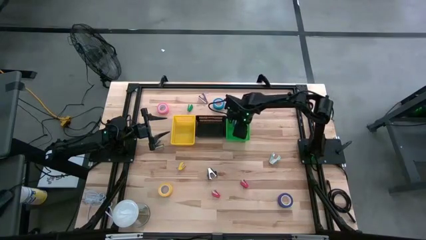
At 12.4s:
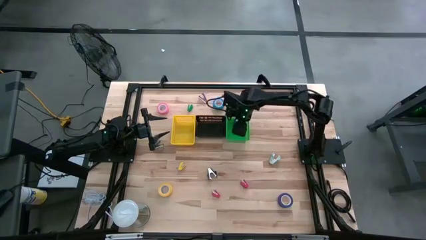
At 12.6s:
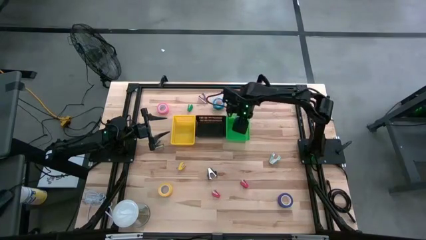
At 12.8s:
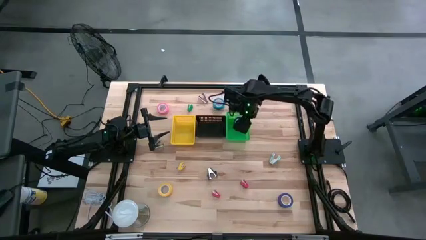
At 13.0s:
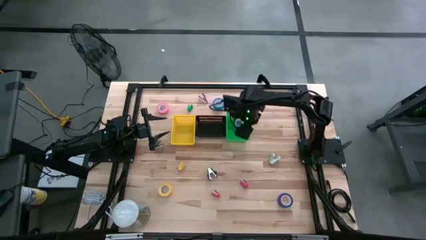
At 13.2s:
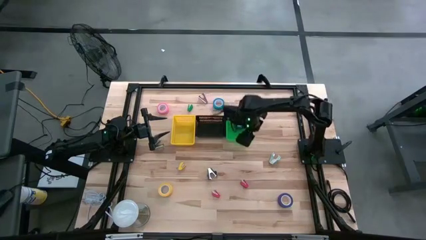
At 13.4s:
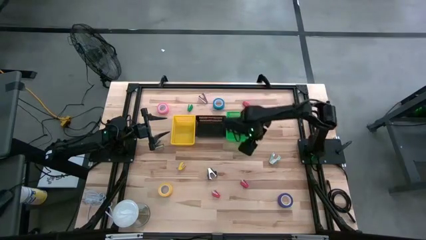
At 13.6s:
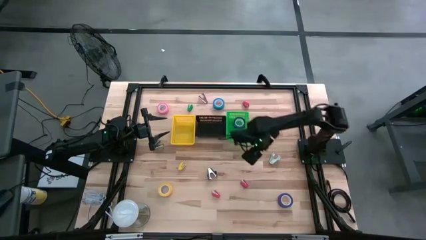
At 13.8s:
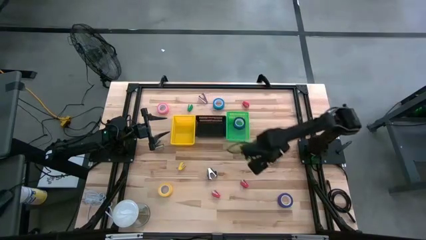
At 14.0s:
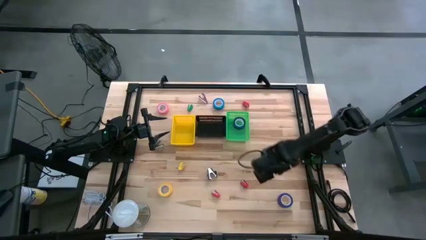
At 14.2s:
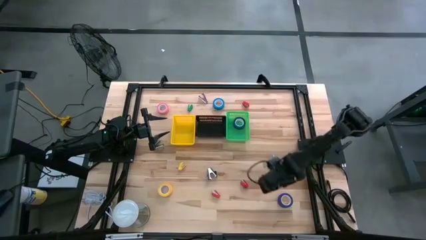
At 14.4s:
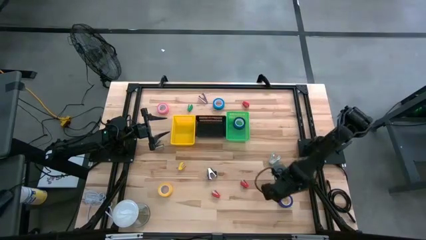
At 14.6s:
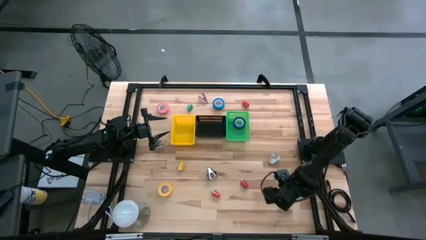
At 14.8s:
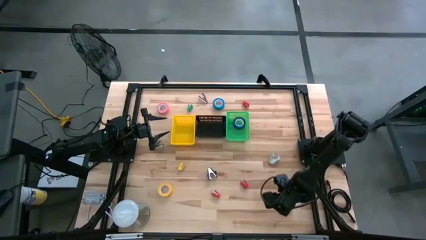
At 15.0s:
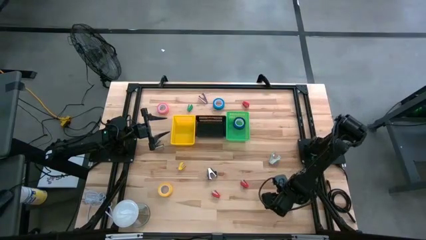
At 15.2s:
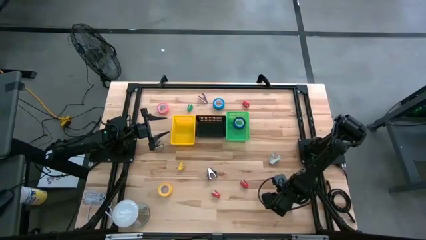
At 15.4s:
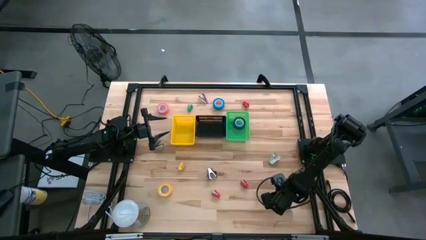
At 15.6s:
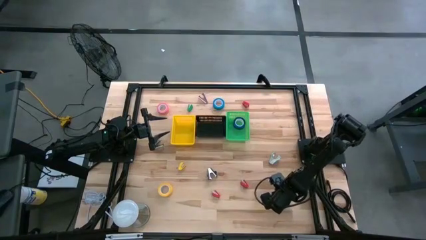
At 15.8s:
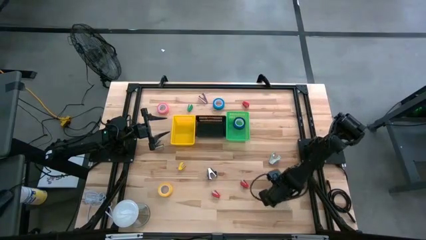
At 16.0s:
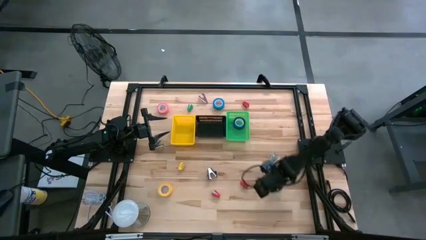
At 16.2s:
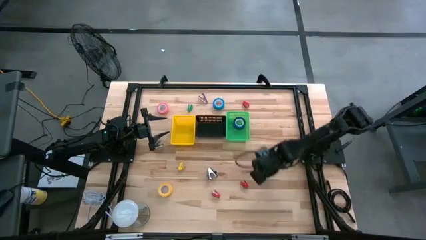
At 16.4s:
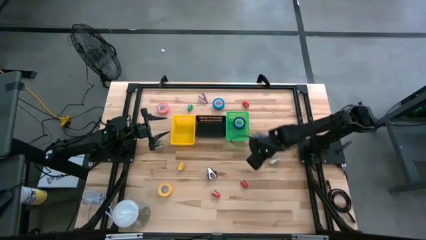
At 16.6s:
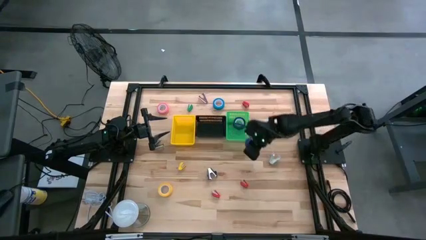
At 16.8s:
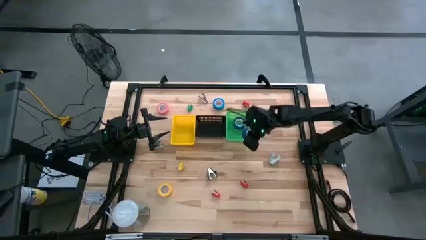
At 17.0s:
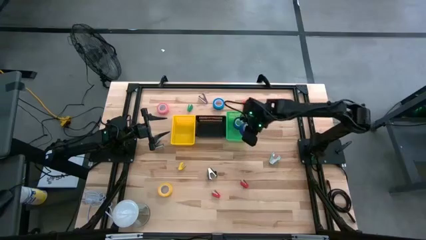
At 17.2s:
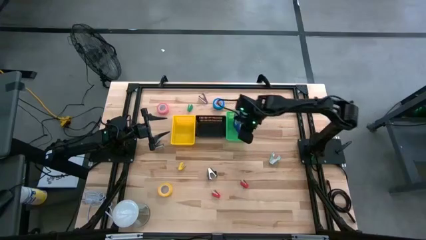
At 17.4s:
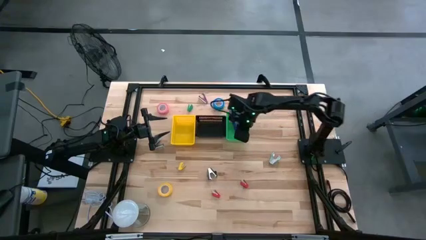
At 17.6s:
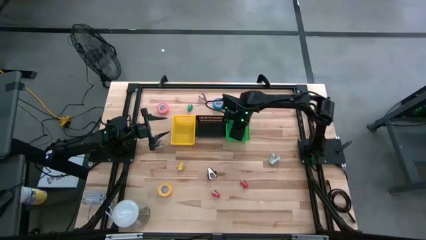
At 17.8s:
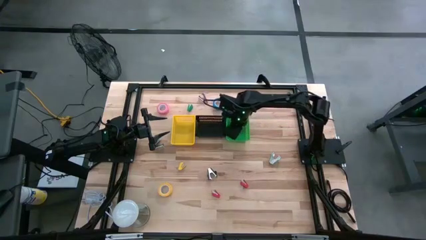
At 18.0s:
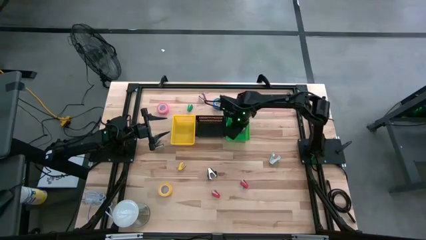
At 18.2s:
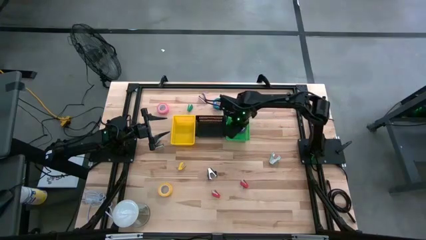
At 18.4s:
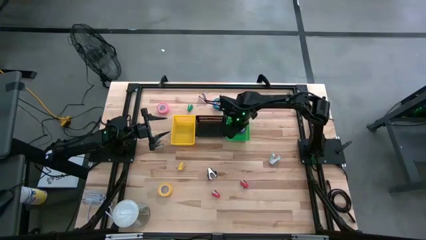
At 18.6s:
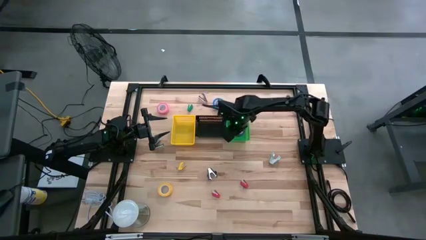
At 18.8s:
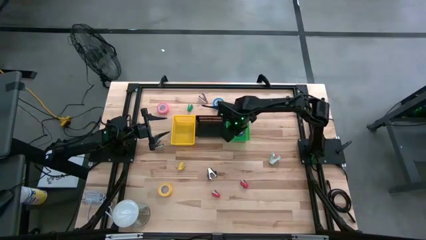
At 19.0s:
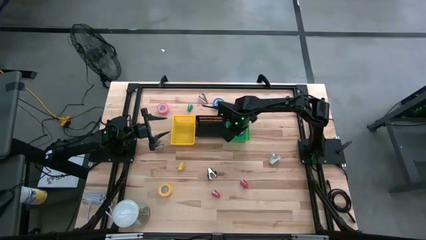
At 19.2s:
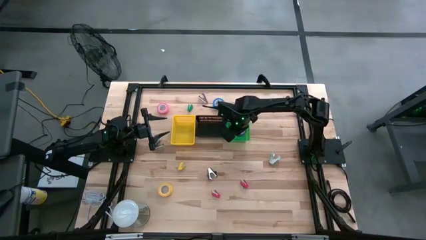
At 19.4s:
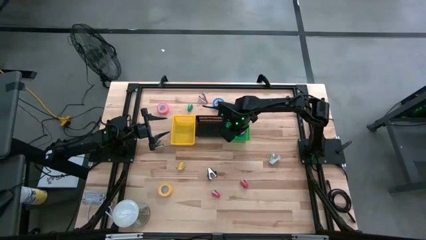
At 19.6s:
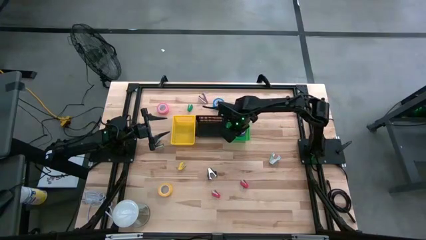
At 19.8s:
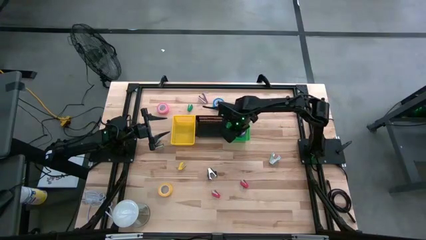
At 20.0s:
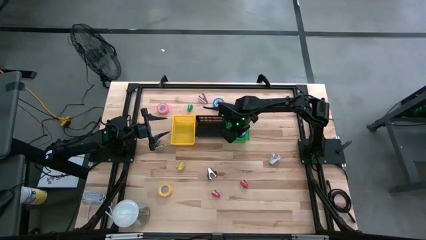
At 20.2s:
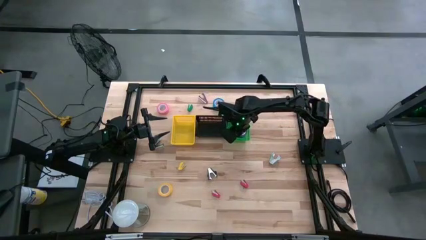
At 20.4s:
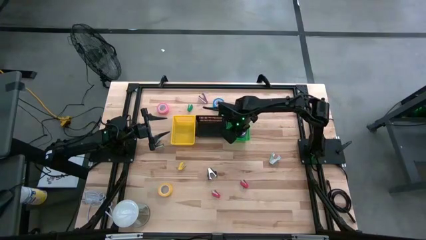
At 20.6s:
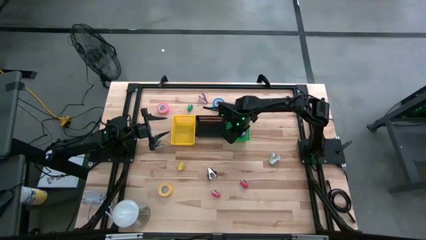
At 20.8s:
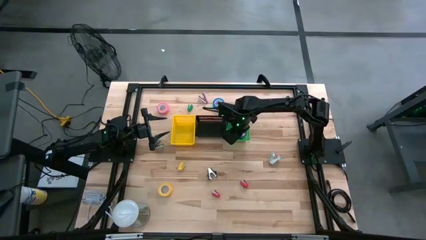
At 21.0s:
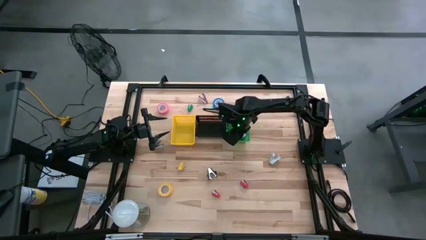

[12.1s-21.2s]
Task: Pick and place Stapler, Stapler remover, tape
Put the blue tape into the green bin

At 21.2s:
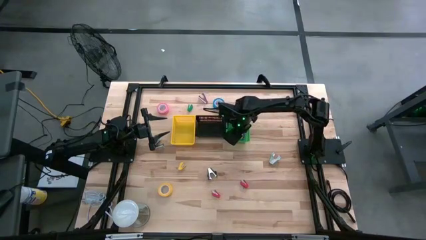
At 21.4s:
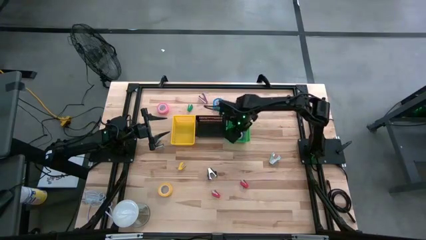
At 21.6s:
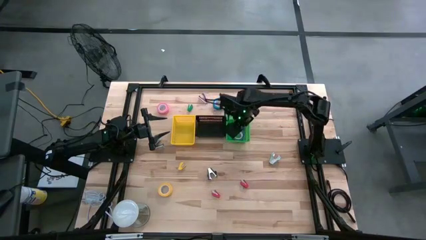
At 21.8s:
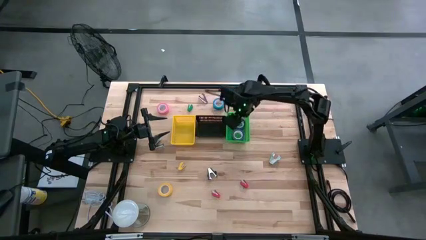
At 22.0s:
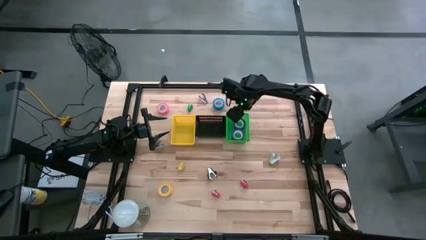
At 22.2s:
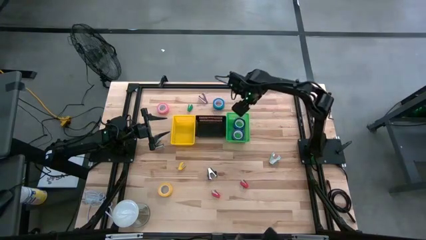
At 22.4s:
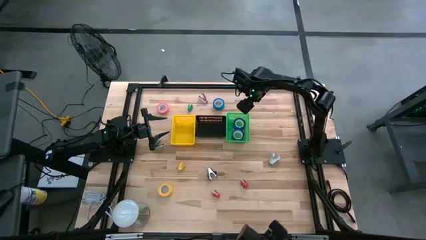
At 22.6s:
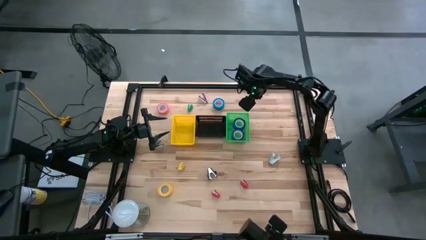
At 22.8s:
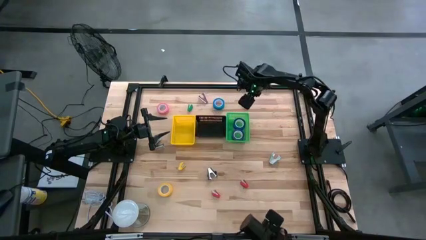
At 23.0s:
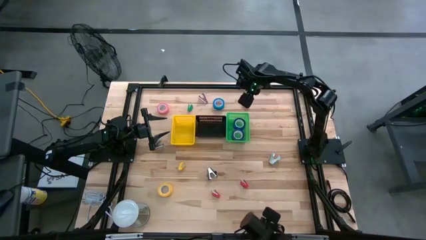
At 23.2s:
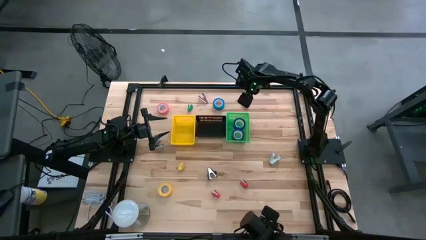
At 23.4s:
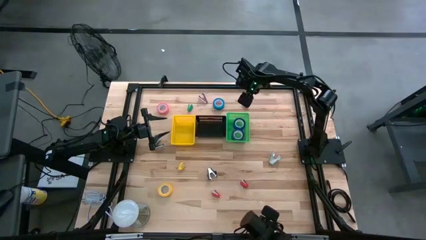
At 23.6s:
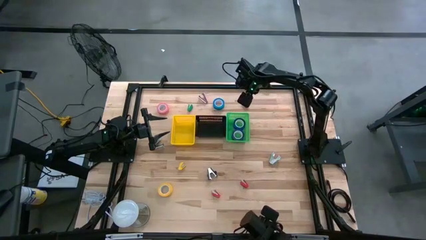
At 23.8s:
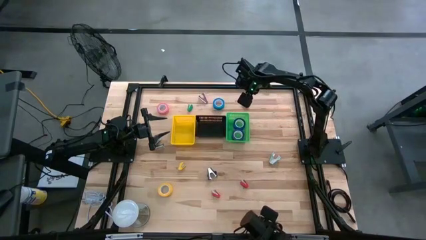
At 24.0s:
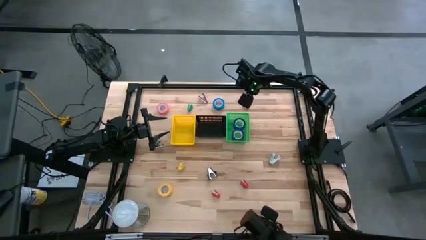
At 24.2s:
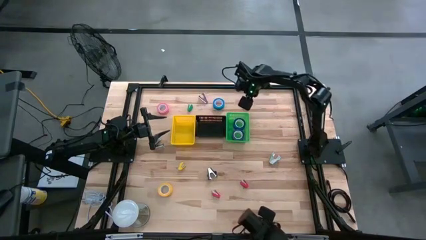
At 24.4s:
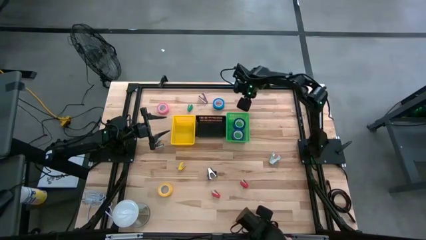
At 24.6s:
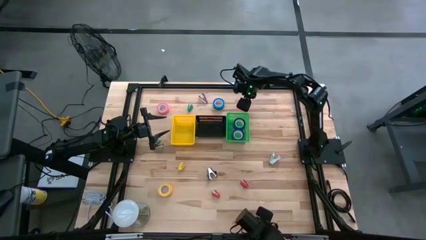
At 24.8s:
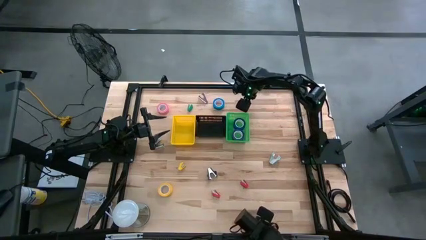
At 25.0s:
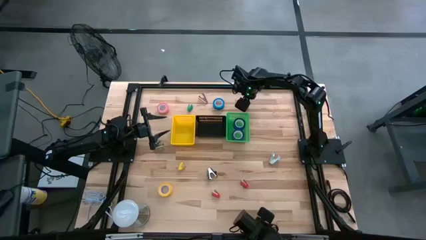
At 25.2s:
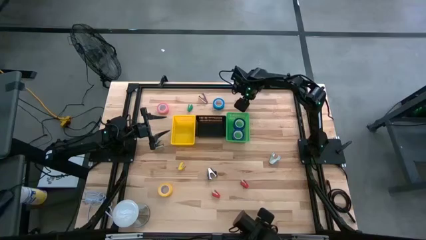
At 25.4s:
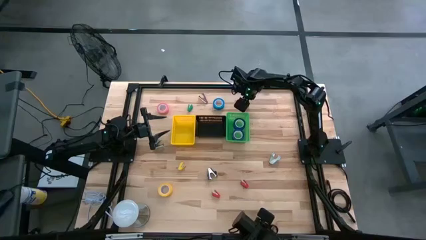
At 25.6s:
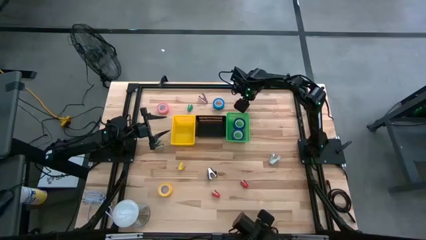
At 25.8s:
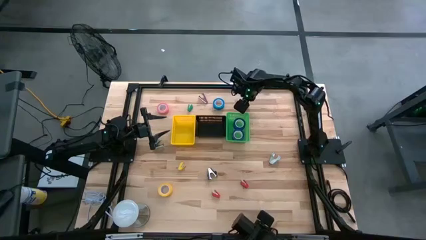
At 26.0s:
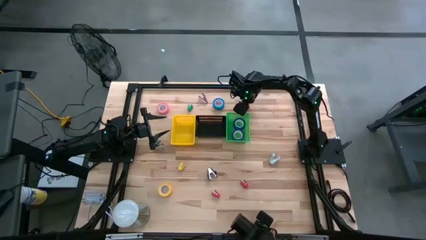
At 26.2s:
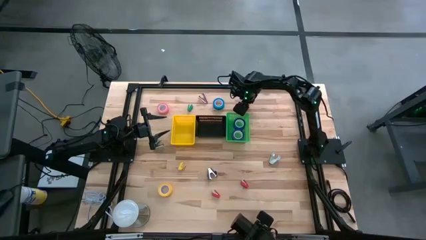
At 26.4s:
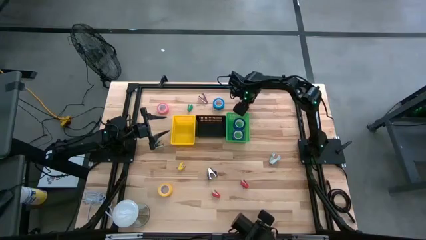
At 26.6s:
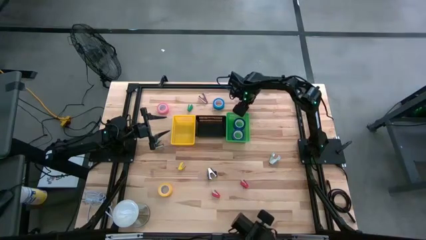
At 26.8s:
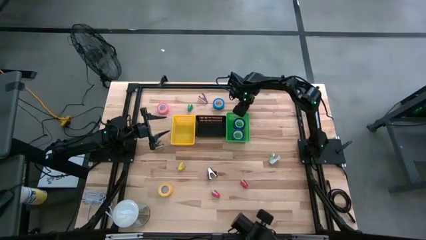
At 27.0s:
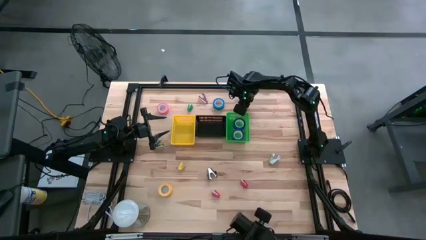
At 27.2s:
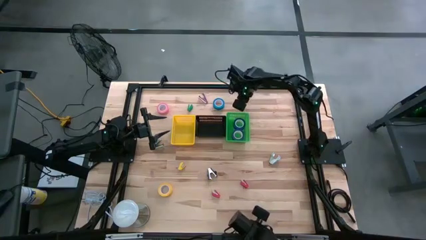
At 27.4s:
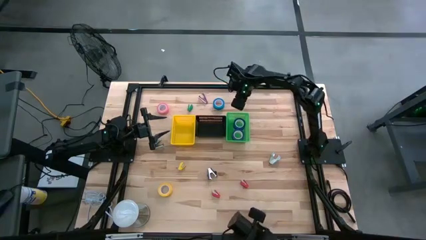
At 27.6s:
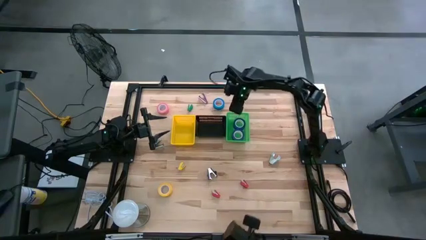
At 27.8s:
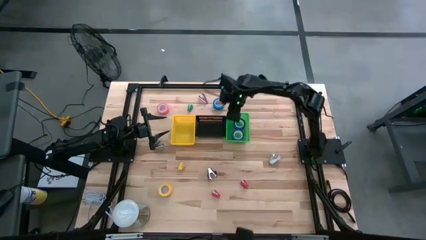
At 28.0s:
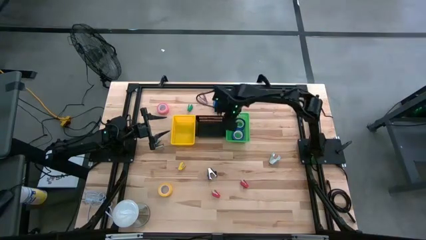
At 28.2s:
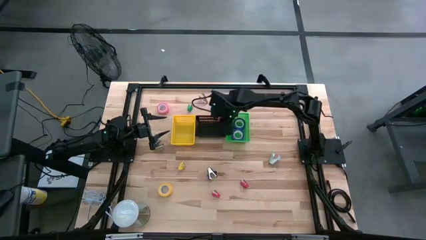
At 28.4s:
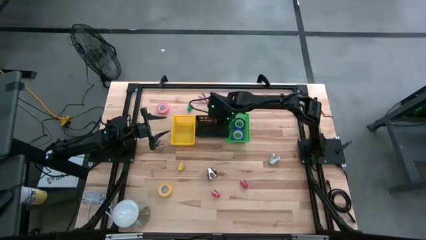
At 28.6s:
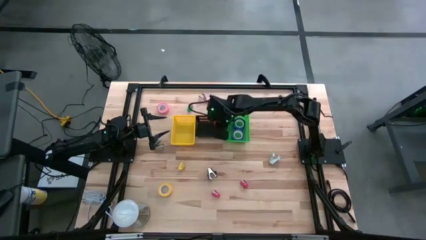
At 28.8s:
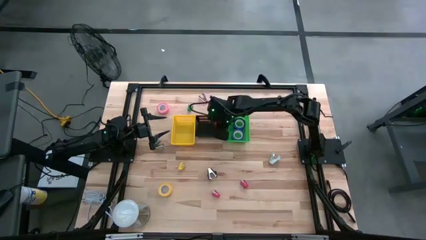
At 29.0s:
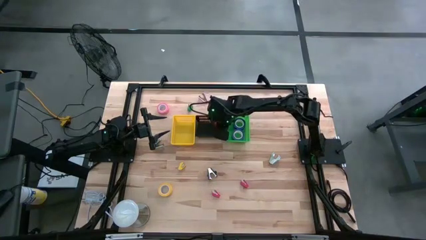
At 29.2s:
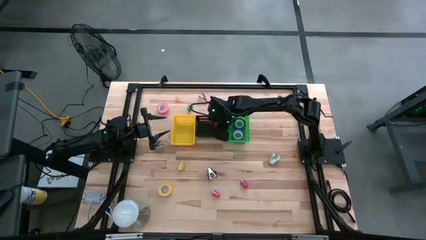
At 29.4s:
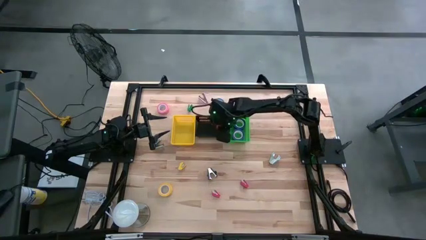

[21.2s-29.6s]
Put the top red stapler into the black bin
